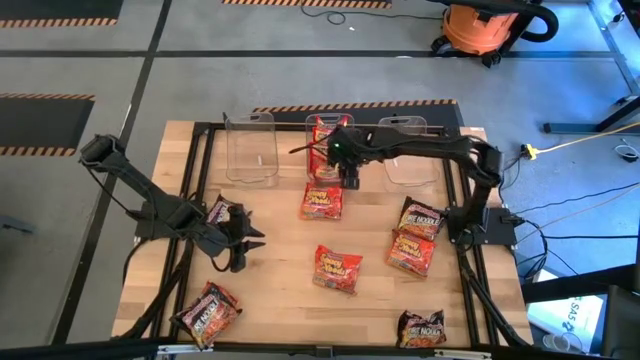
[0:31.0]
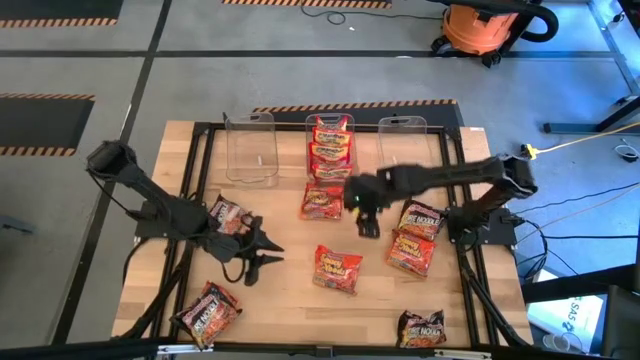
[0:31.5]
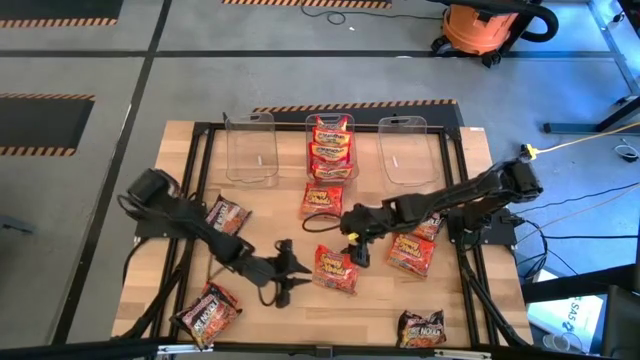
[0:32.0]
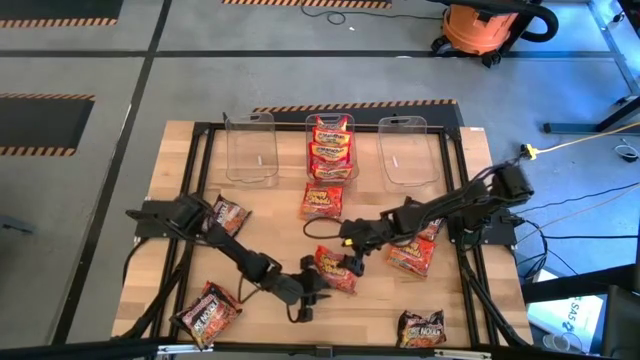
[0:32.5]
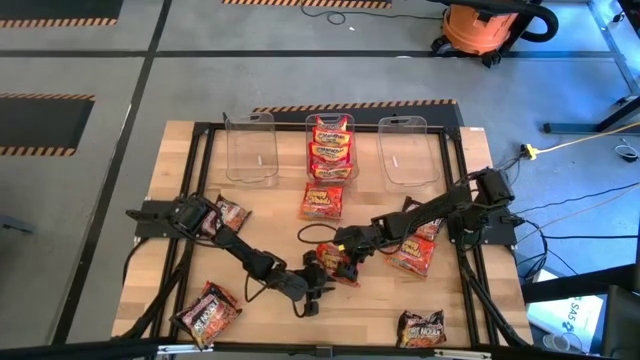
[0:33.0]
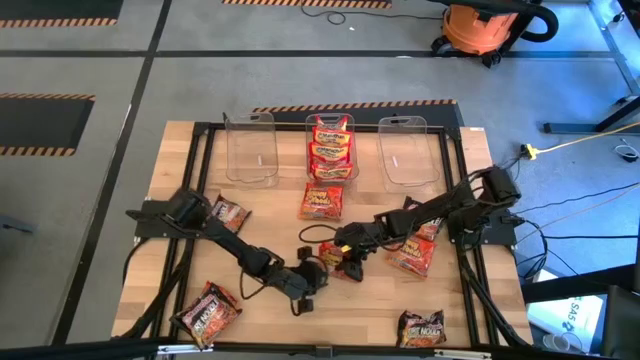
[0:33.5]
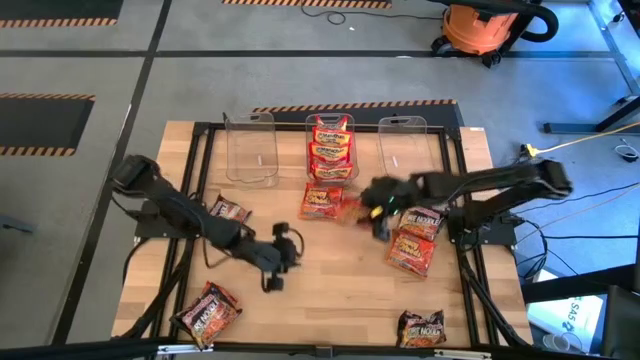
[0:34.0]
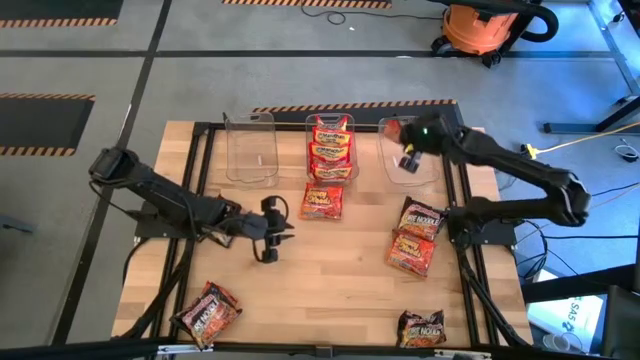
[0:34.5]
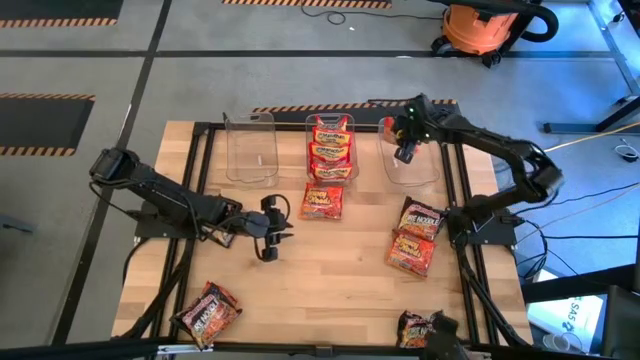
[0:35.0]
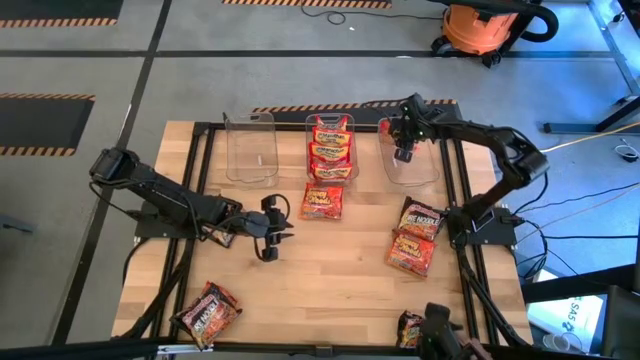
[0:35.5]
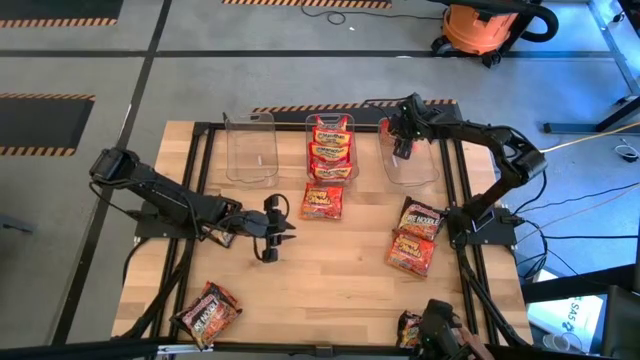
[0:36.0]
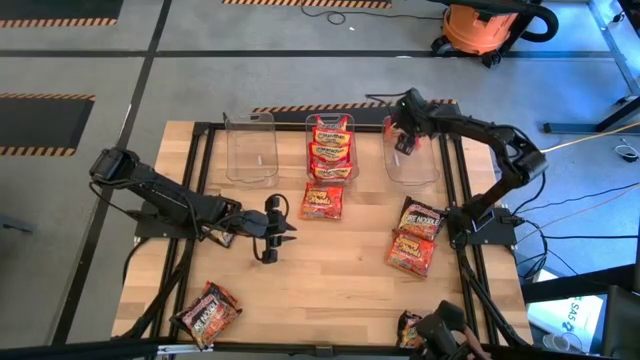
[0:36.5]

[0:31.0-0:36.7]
Task: Sort Maruchan noodles
Put the orange noodle pack into the right transparent bin

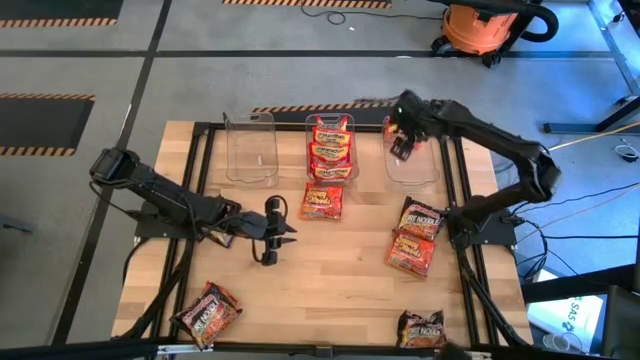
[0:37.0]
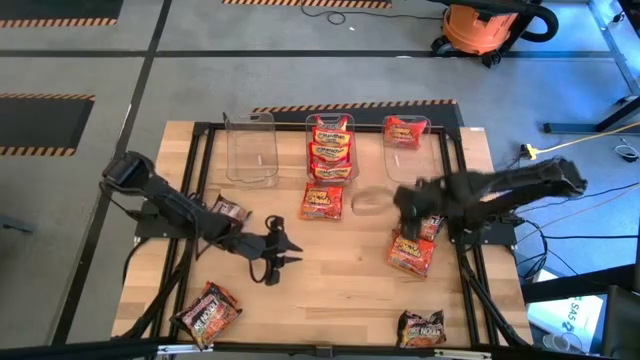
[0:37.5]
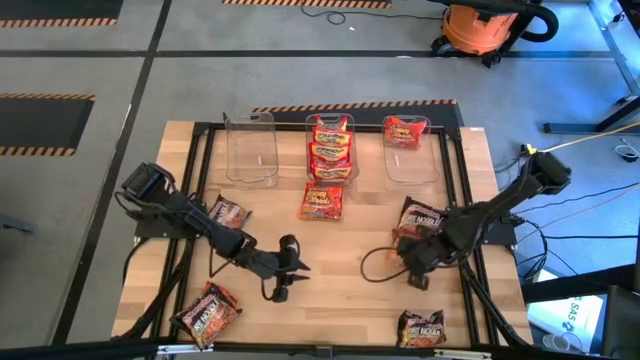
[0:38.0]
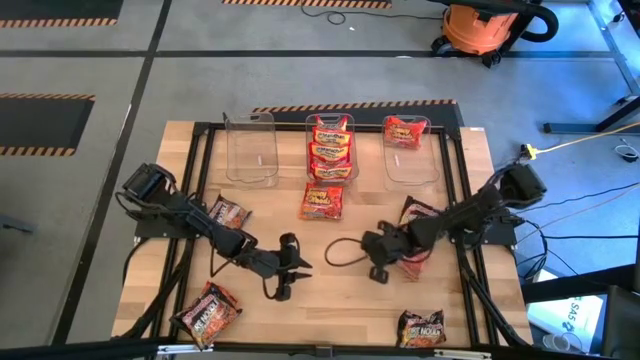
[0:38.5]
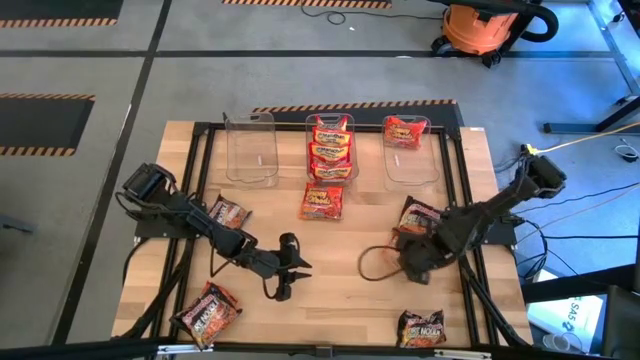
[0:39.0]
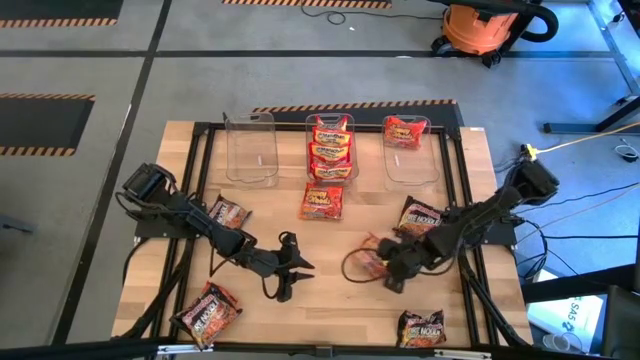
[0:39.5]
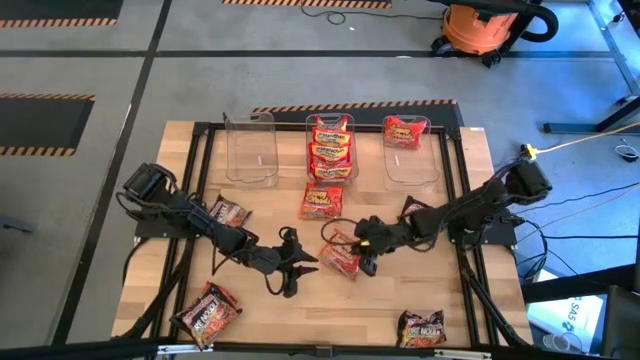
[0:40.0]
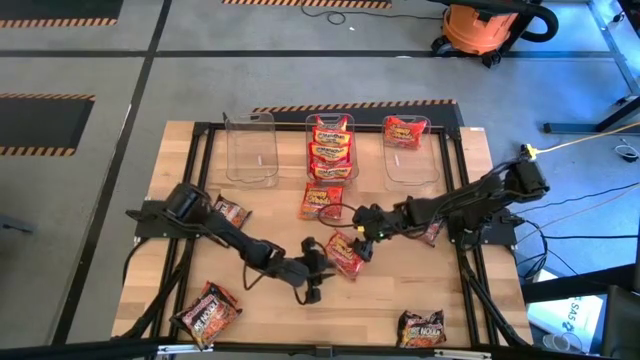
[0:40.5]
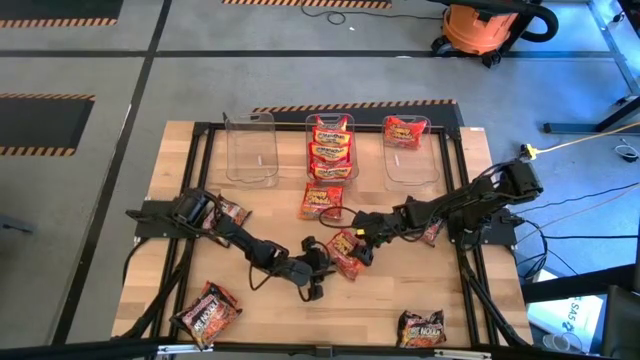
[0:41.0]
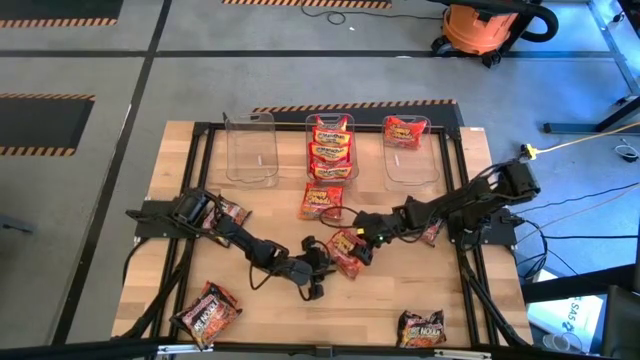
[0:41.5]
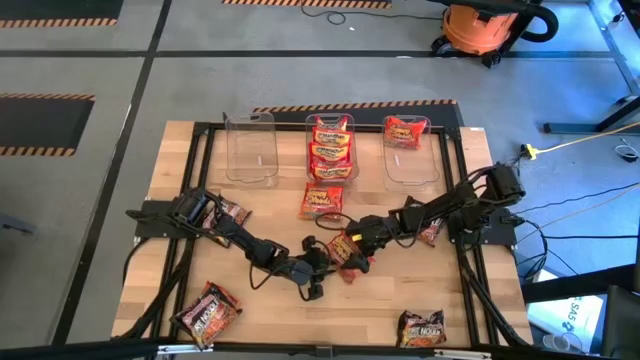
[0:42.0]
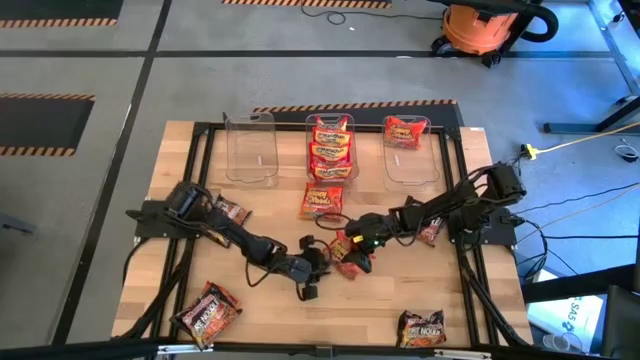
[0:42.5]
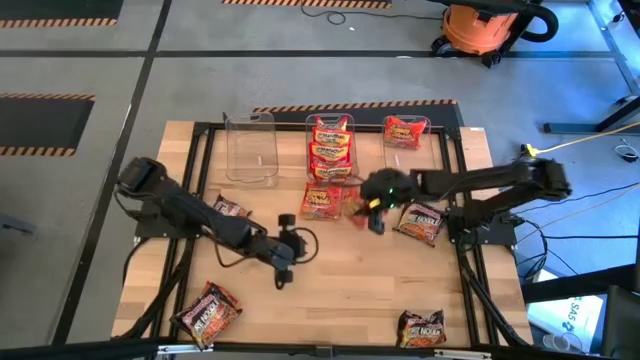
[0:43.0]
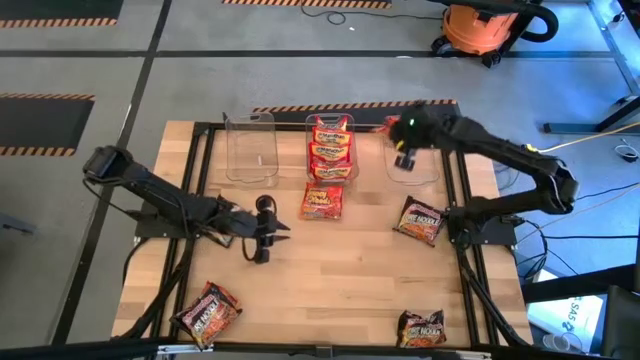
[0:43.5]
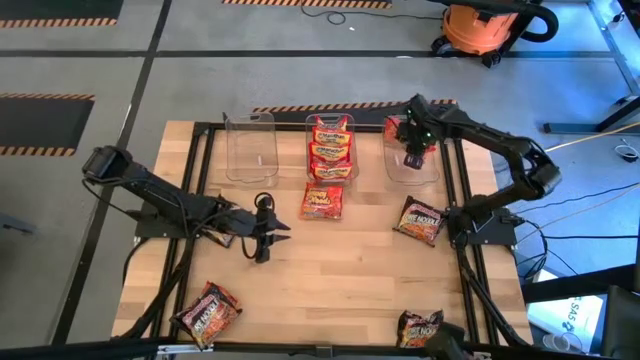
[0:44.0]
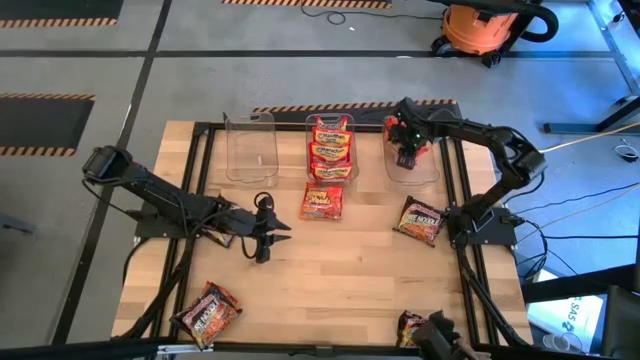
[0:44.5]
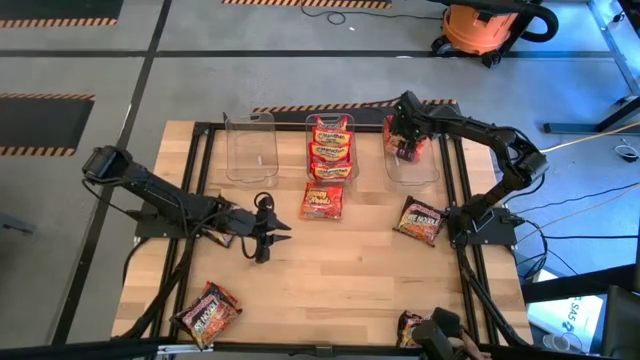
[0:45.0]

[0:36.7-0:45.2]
Put the orange noodle pack into the right transparent bin

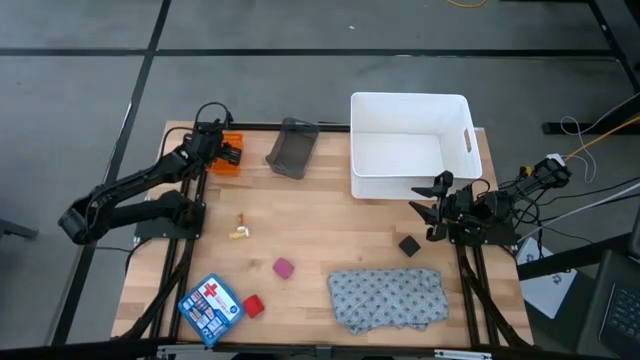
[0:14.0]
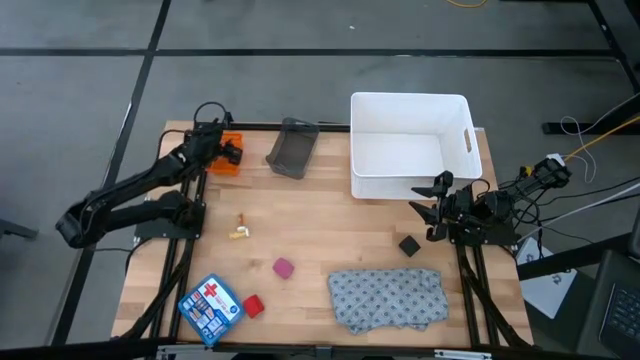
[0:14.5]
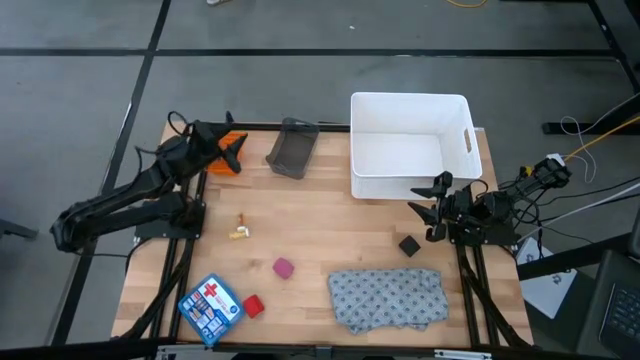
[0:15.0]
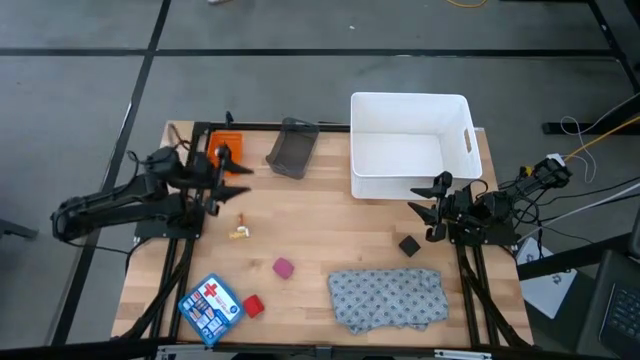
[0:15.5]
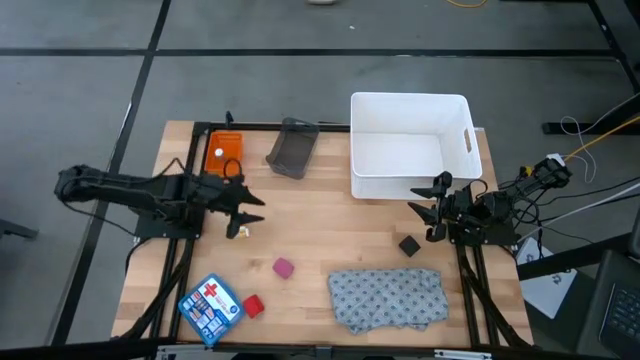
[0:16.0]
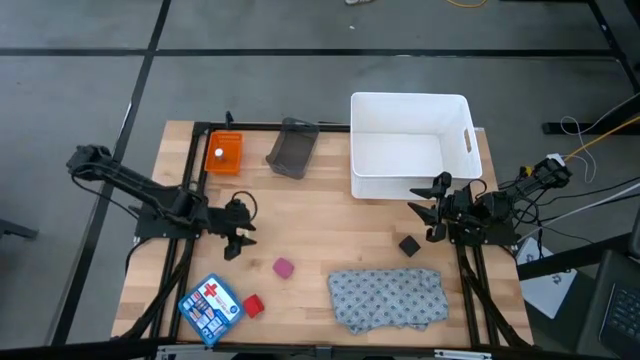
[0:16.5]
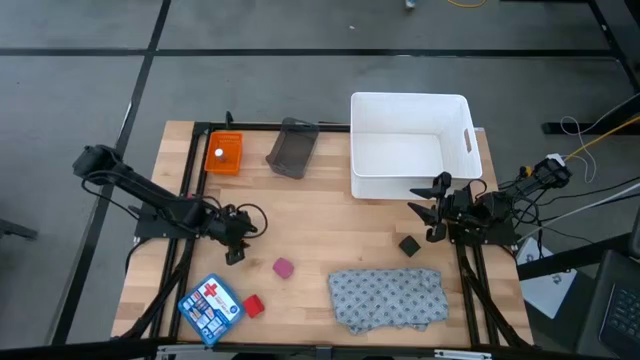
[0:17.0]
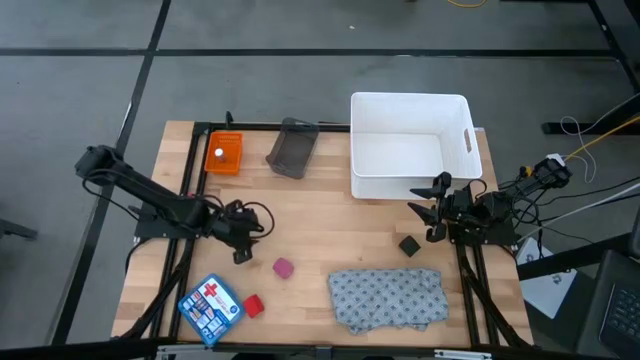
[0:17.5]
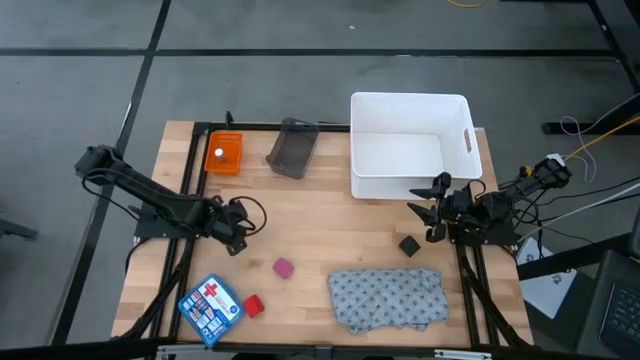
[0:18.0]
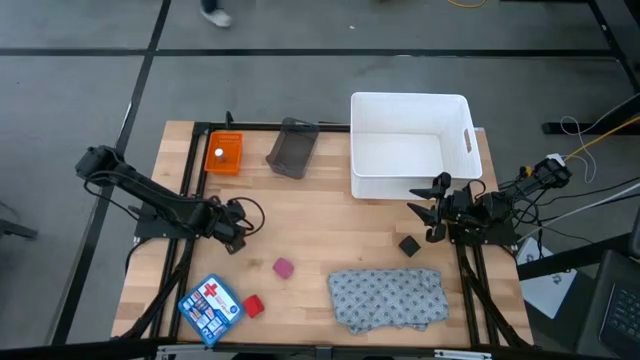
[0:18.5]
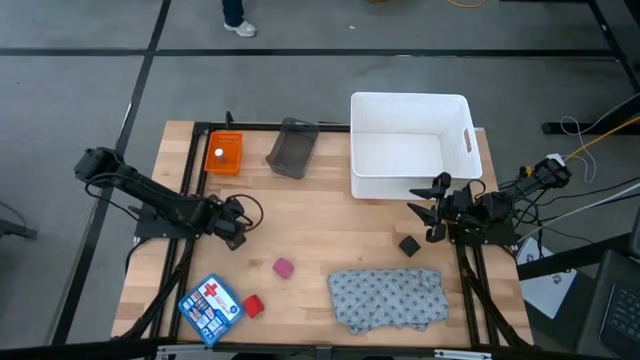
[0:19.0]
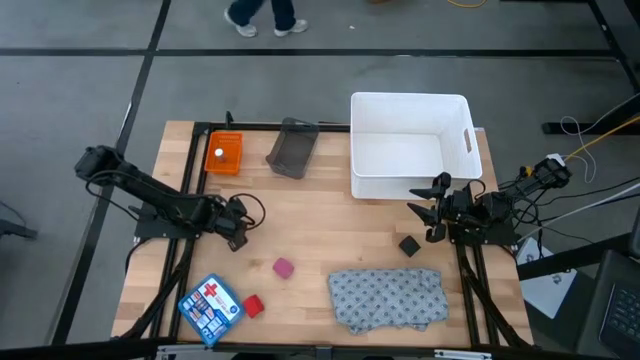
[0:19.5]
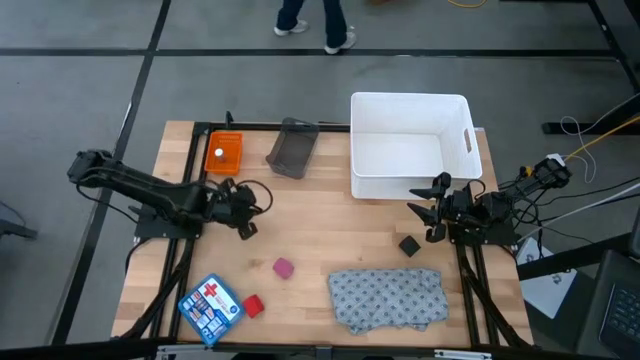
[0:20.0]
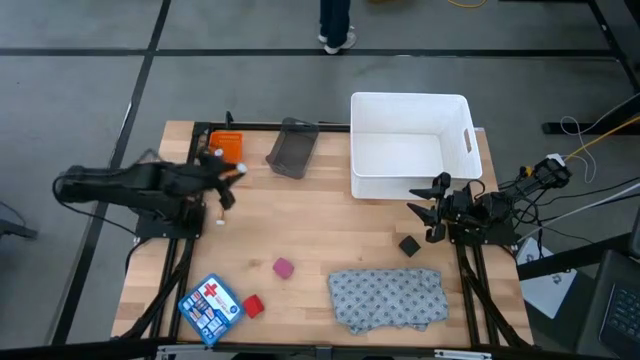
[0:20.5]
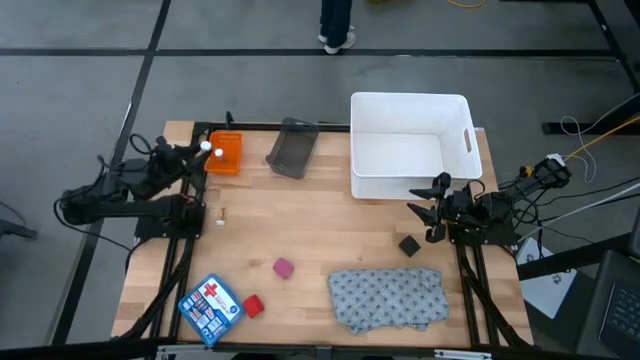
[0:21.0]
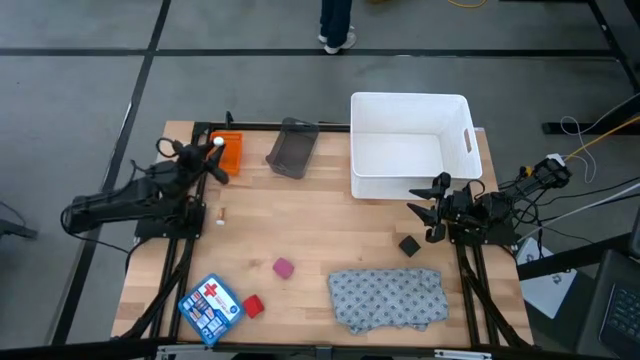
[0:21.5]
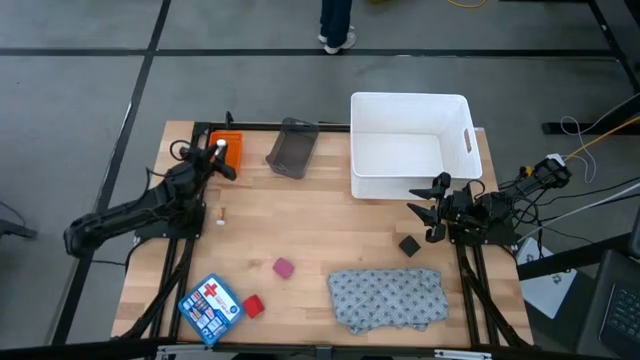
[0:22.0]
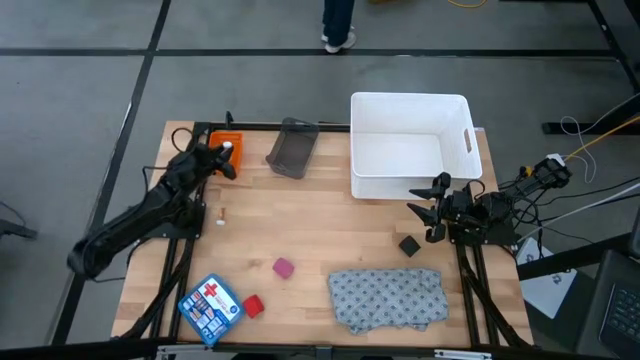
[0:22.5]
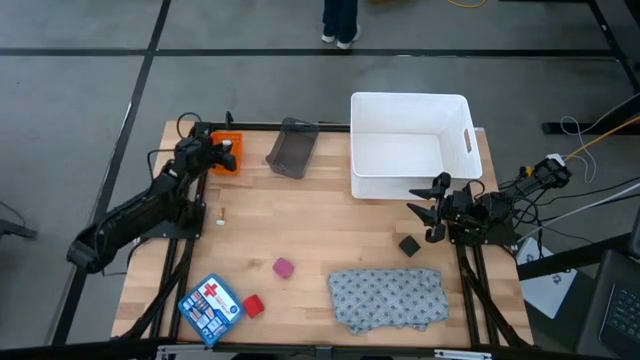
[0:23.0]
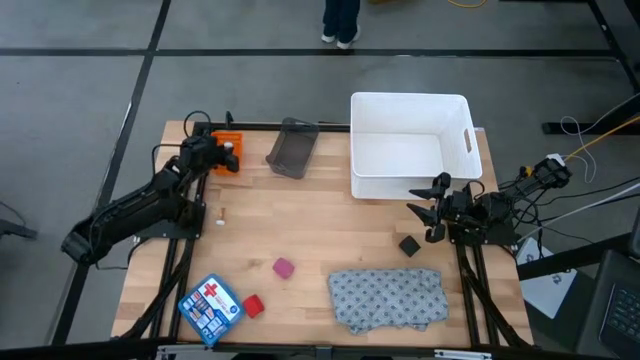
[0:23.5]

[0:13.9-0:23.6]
Task: Pick & place medical supplies in basket/bin
Put the bottom yellow pill bottle into the orange bin
